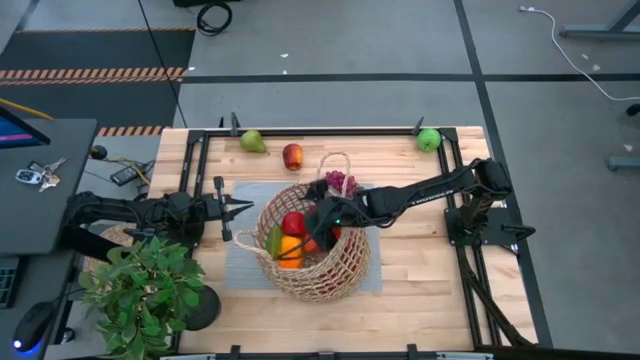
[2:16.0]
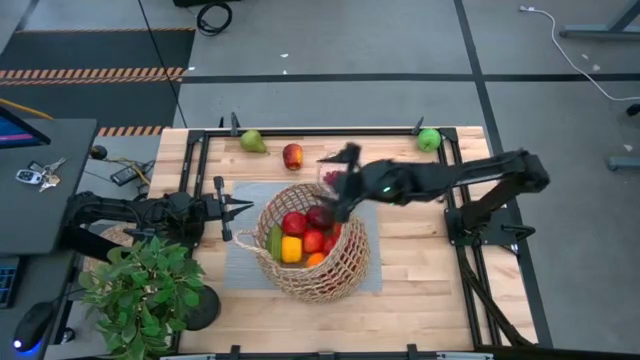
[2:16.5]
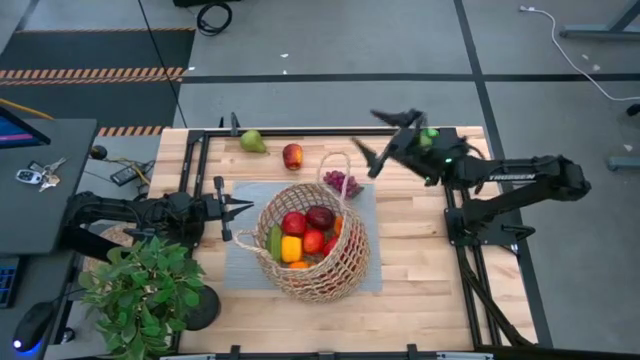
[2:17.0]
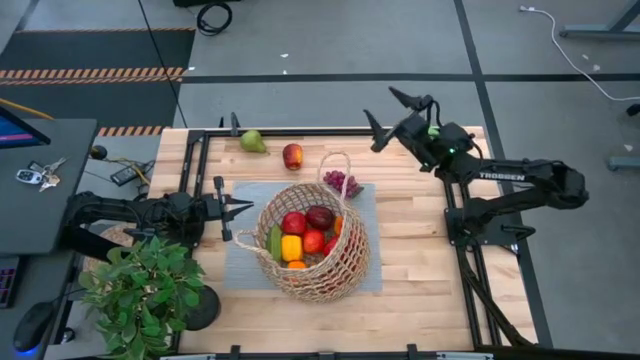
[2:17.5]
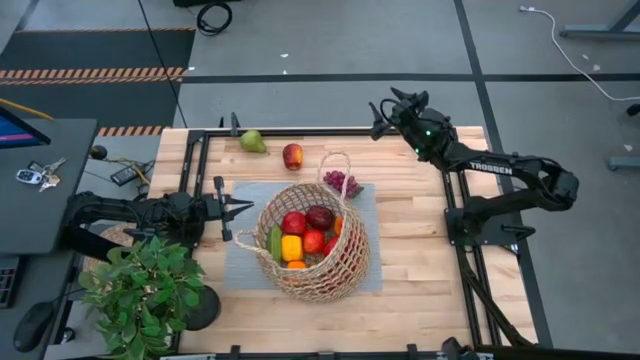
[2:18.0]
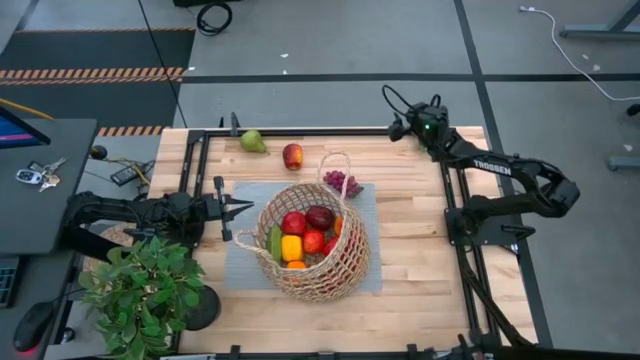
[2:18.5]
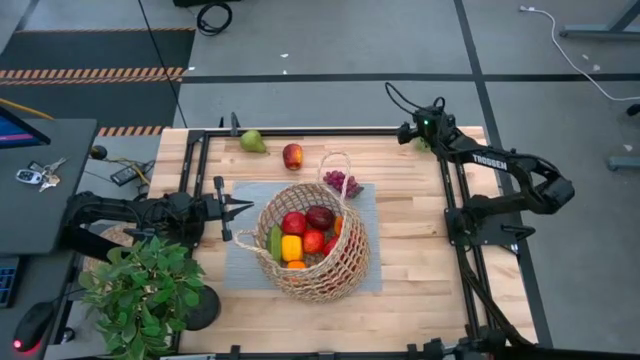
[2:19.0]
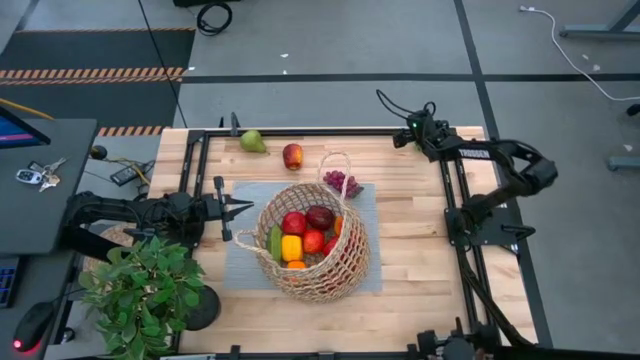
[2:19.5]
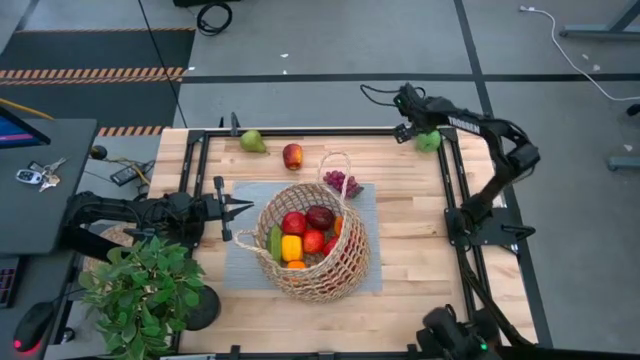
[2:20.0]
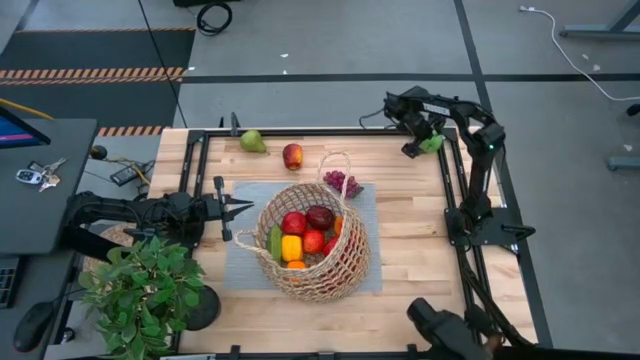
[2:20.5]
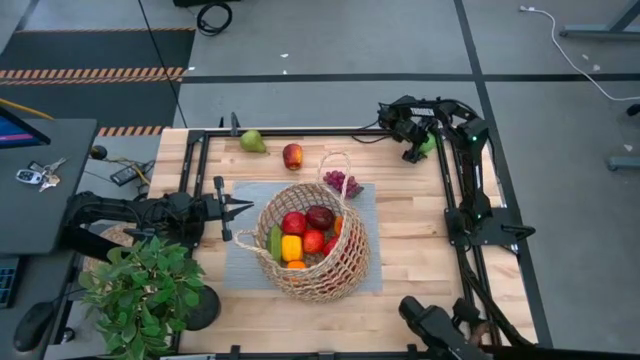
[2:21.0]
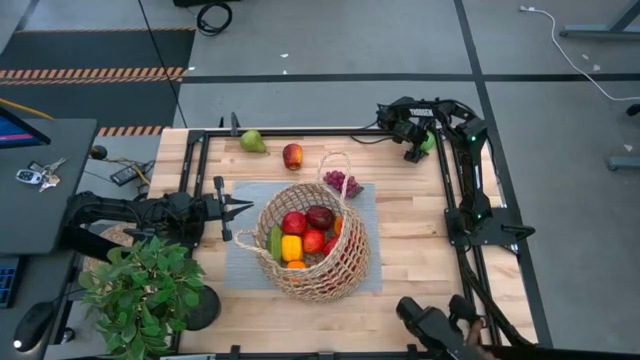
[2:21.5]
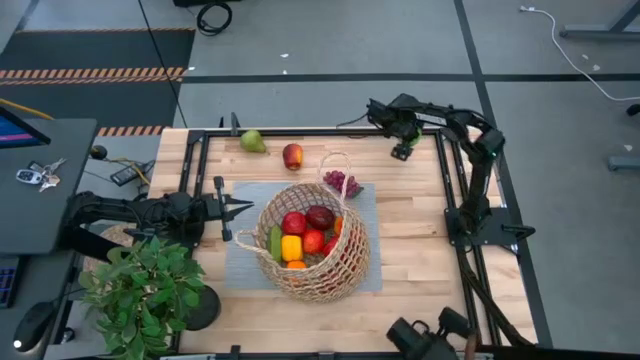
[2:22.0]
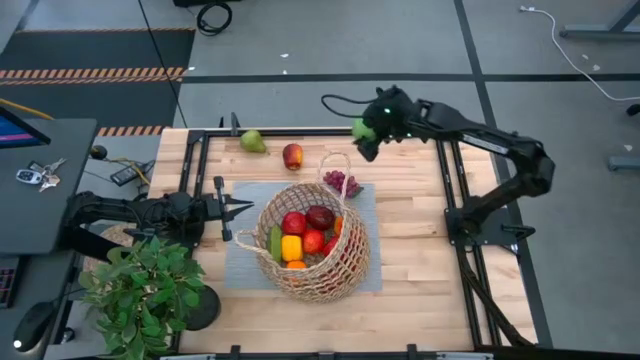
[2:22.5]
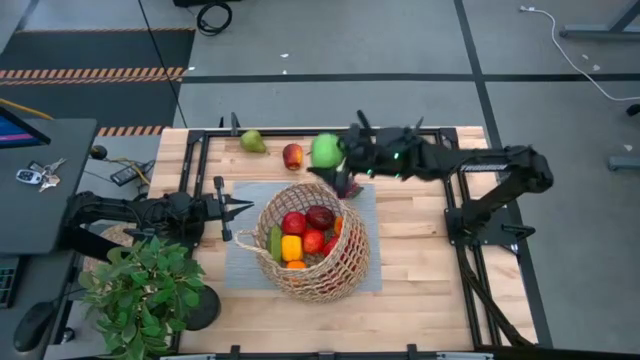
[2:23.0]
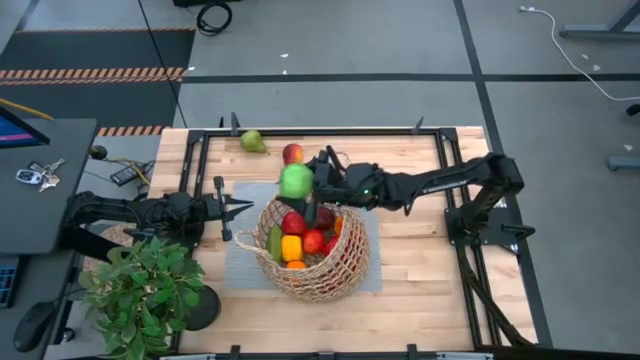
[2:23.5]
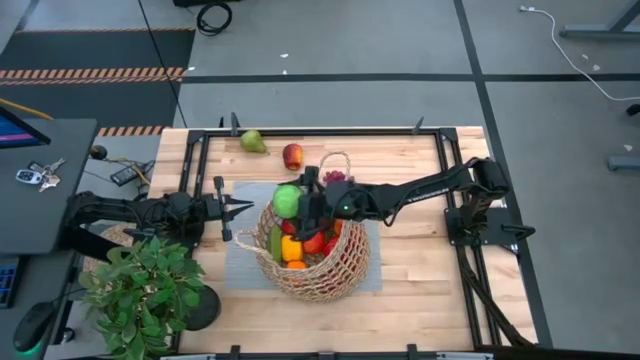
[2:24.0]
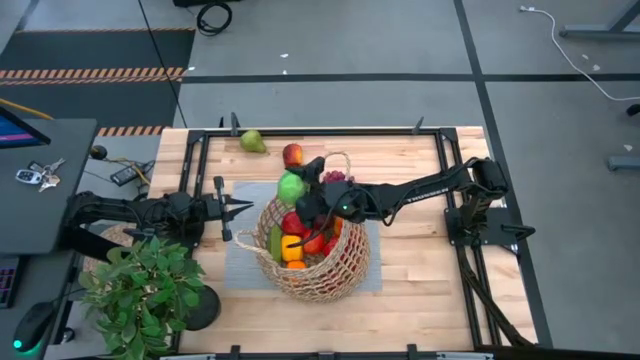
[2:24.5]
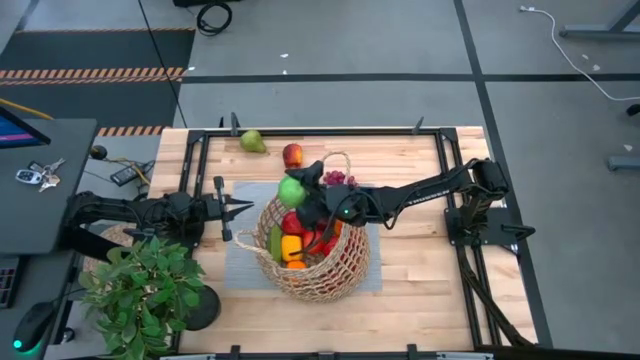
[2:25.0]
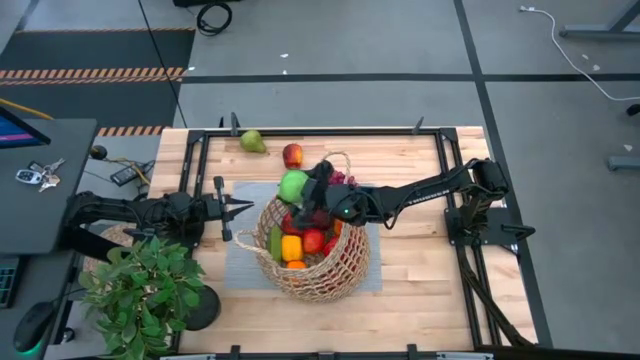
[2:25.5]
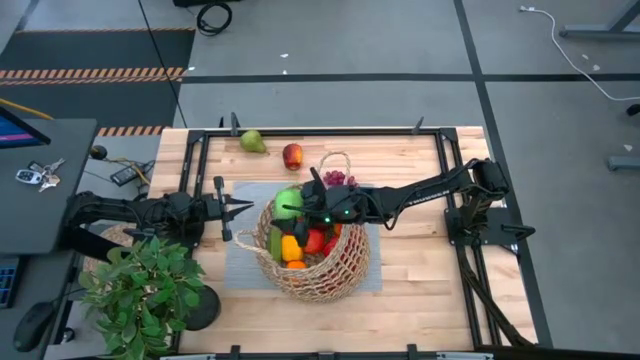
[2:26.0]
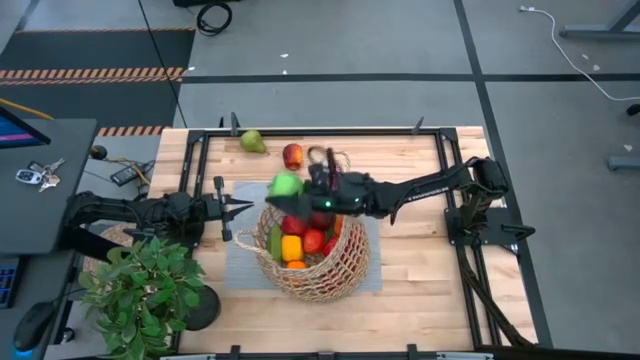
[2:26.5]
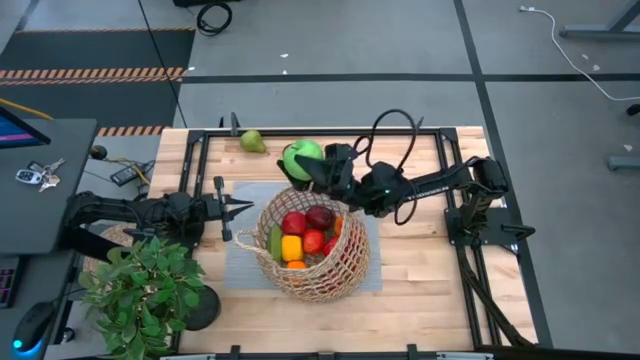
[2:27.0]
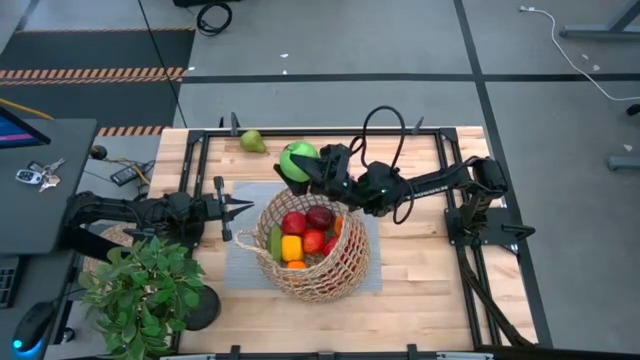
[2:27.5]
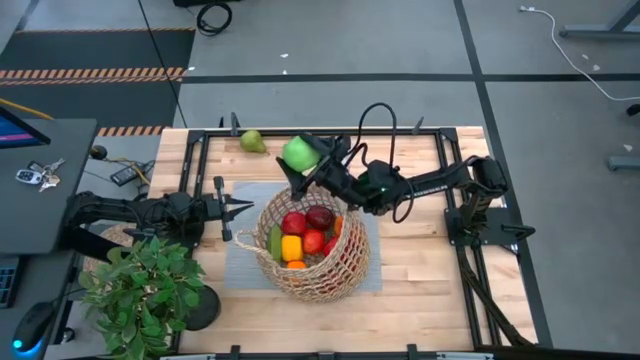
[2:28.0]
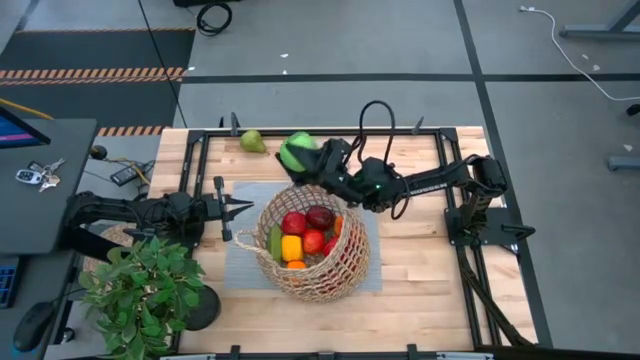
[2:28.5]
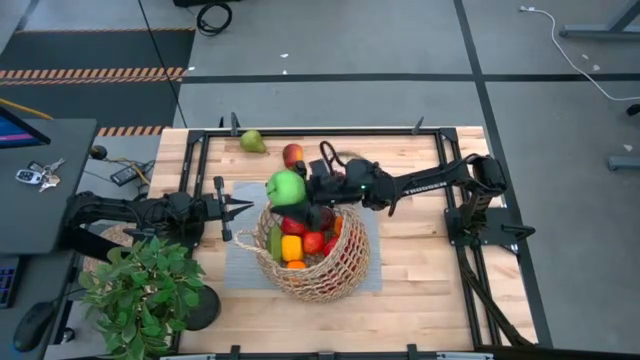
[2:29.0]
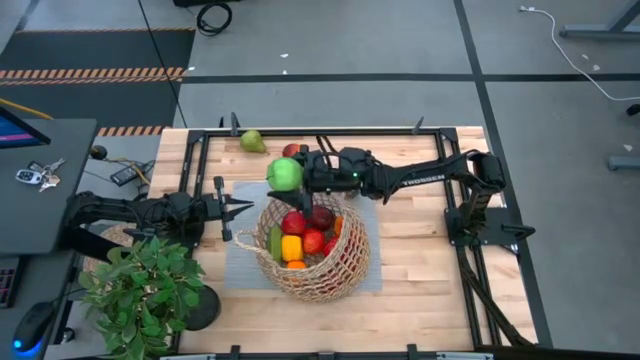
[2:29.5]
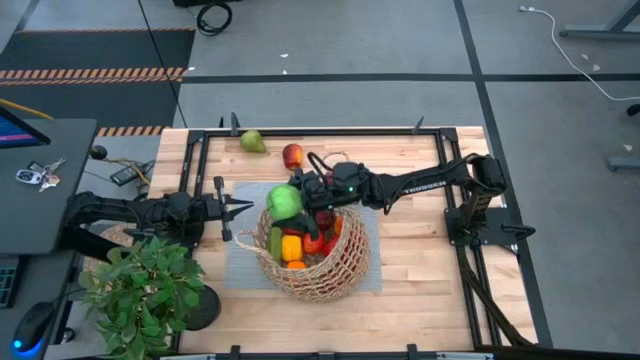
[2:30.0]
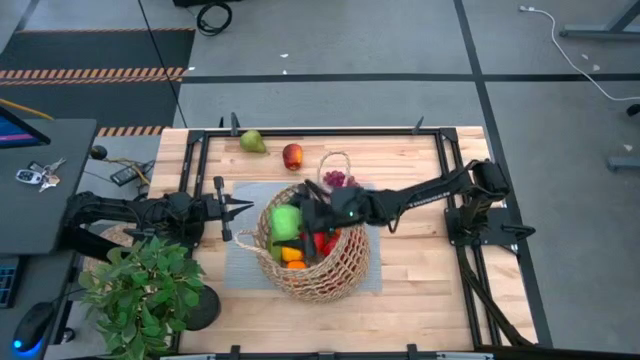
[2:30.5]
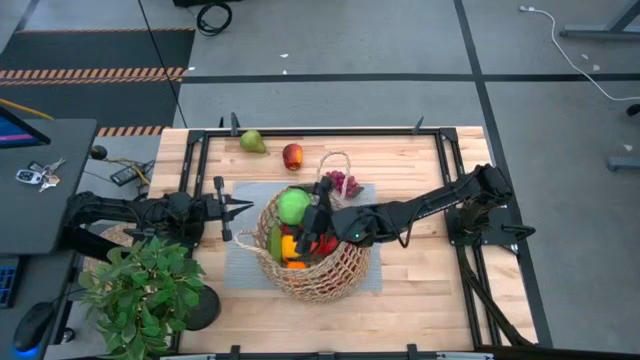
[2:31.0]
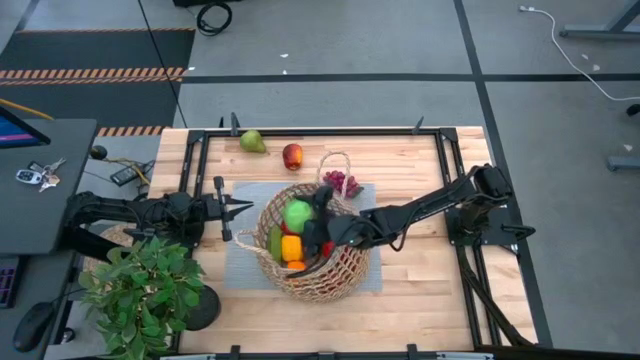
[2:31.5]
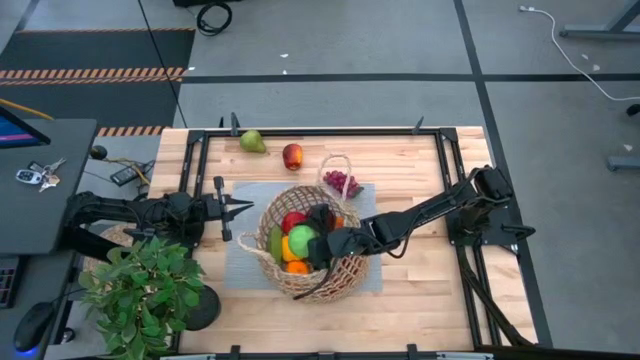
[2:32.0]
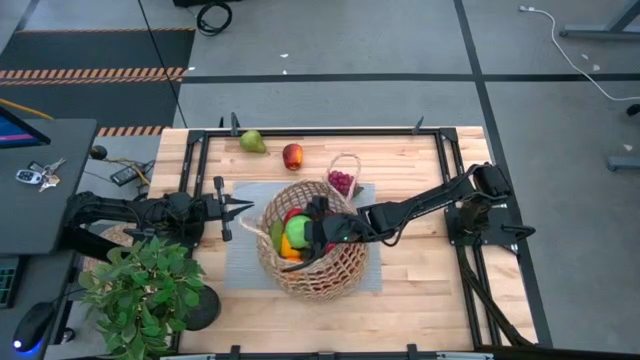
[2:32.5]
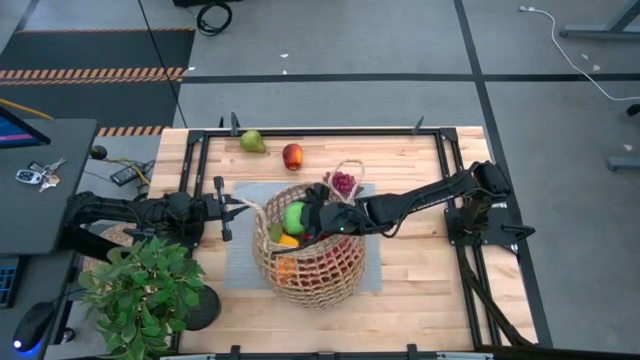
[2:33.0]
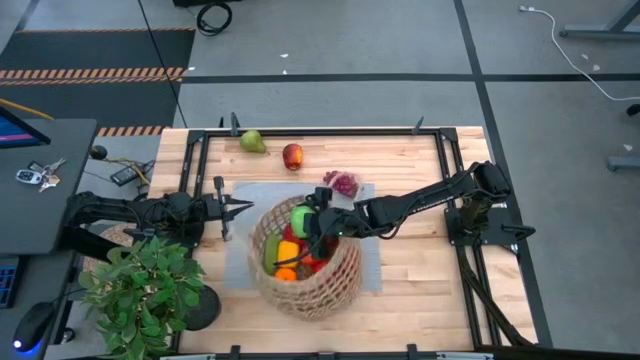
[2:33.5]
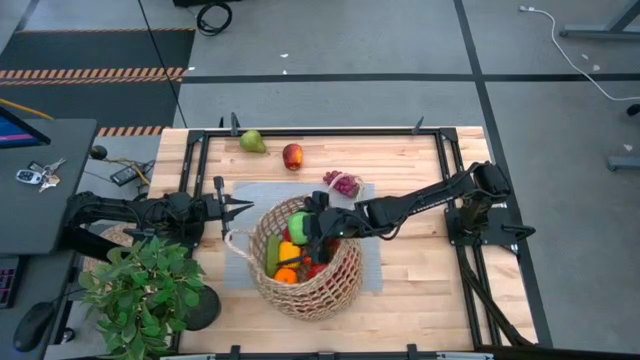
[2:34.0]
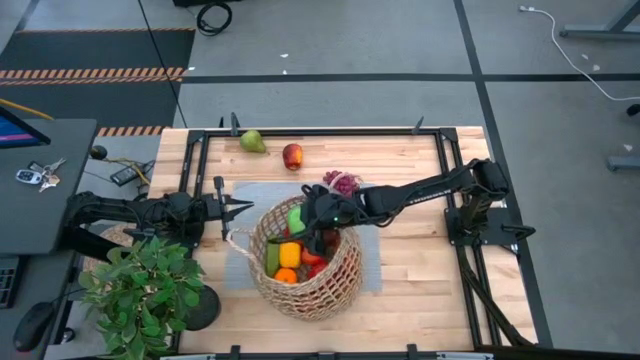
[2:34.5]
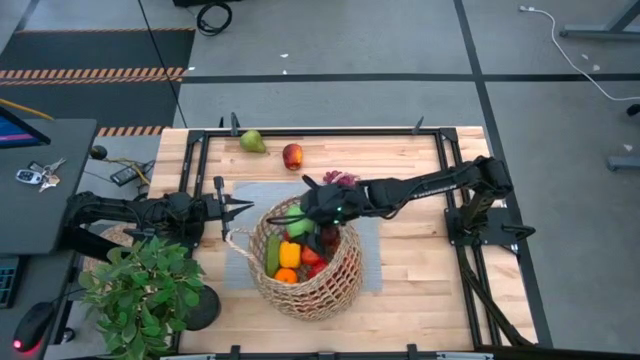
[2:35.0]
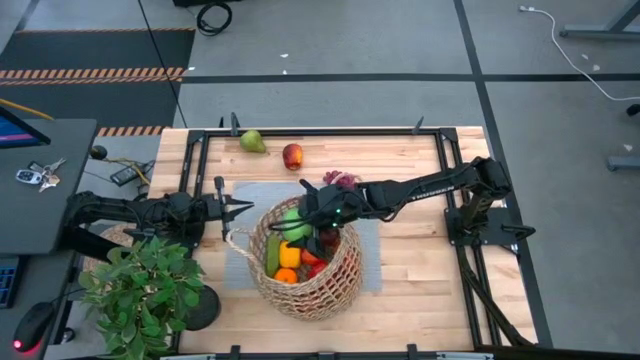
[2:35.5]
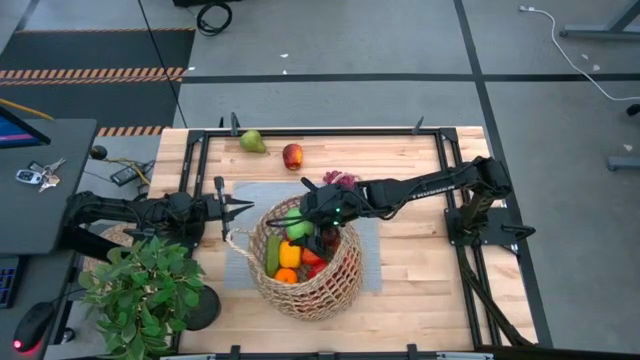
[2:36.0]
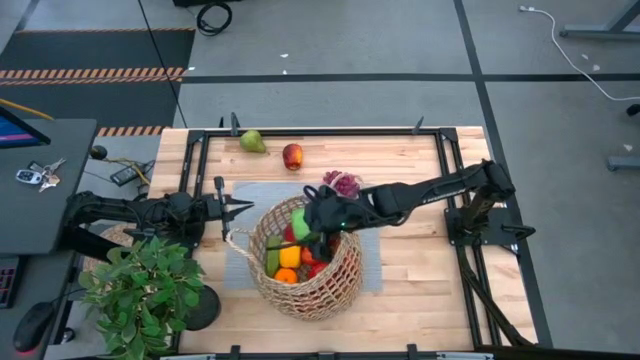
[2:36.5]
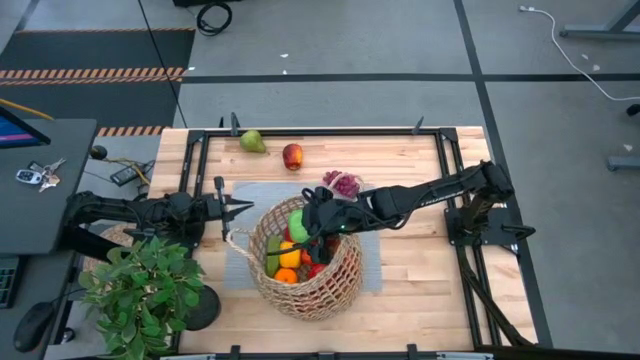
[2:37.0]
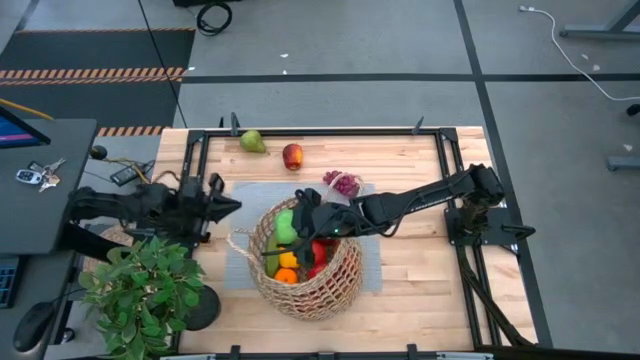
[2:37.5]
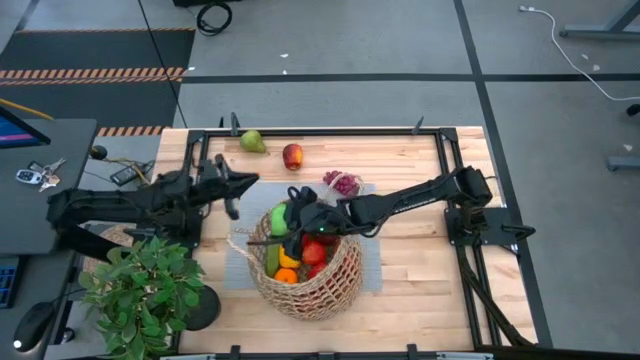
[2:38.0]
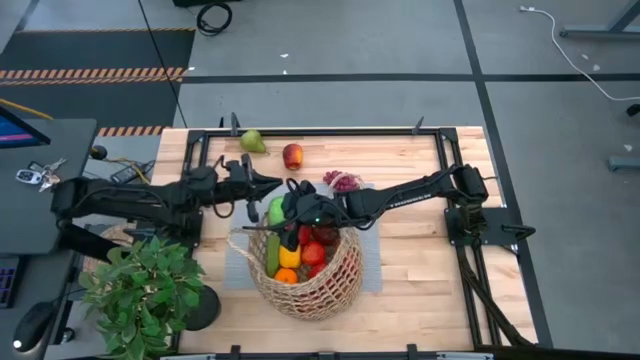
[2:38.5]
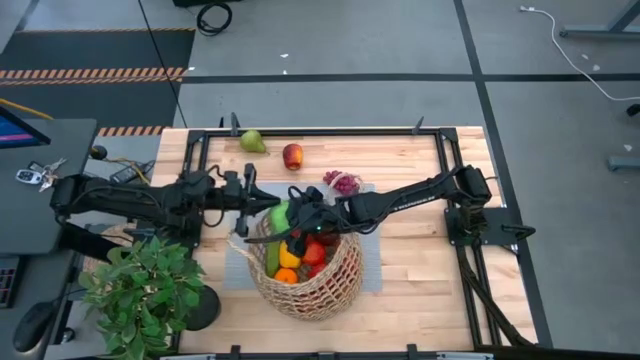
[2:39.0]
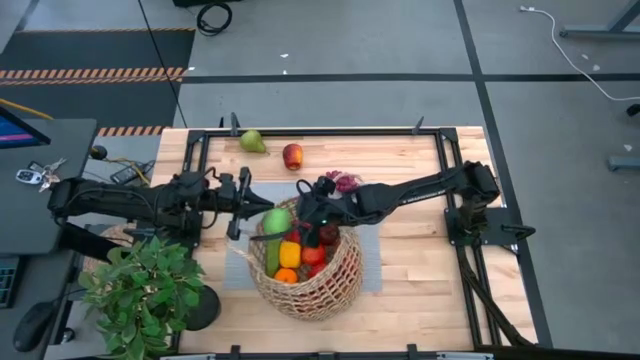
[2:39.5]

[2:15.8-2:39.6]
Task: Build produce basket
Put the green apple into the brown basket
